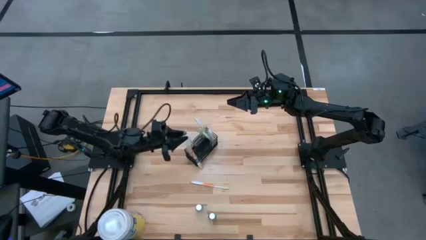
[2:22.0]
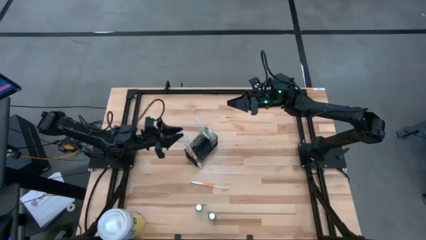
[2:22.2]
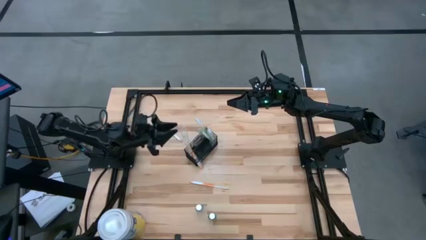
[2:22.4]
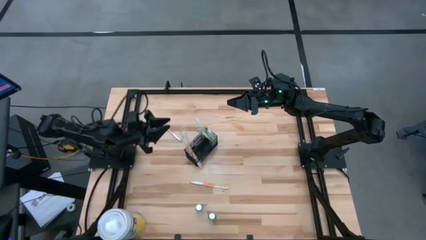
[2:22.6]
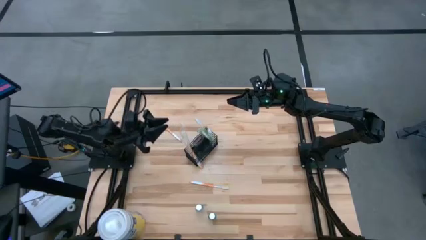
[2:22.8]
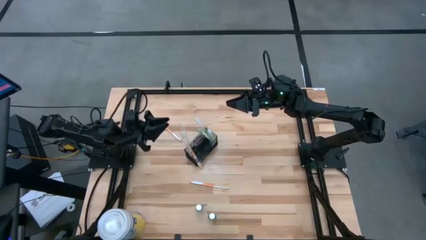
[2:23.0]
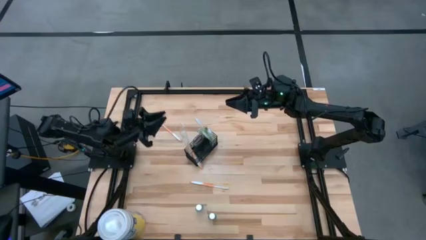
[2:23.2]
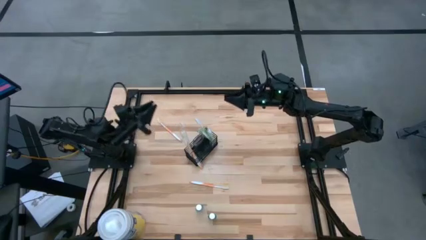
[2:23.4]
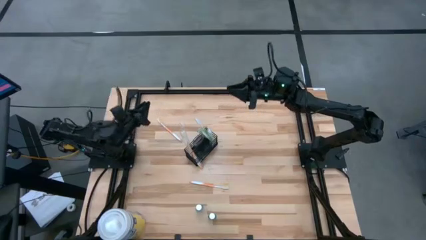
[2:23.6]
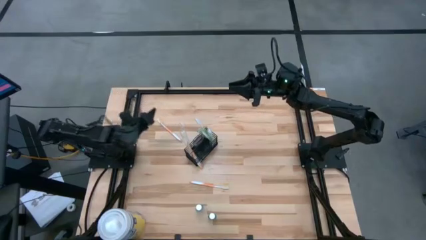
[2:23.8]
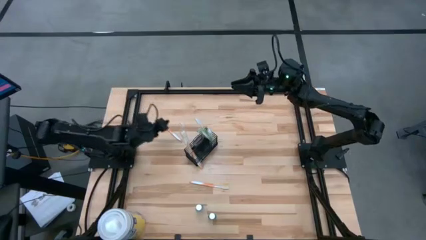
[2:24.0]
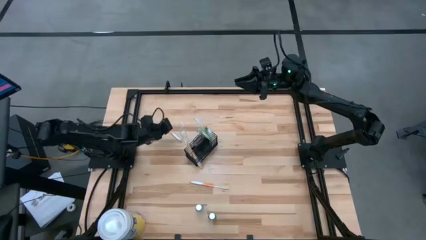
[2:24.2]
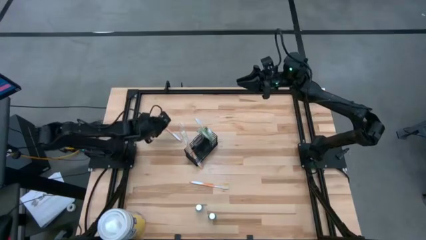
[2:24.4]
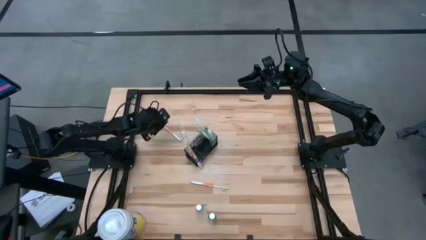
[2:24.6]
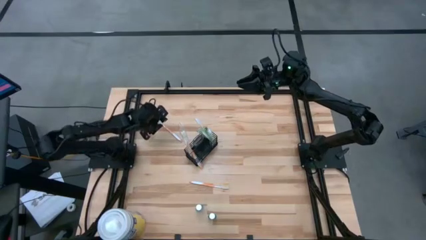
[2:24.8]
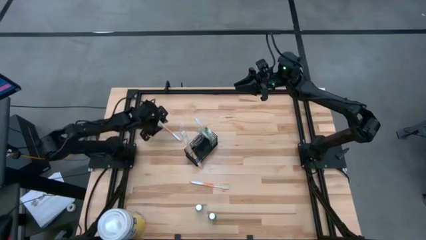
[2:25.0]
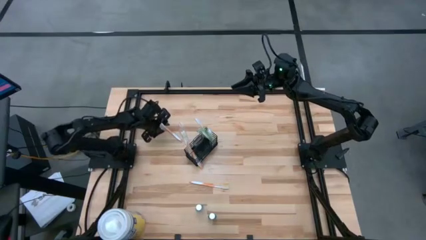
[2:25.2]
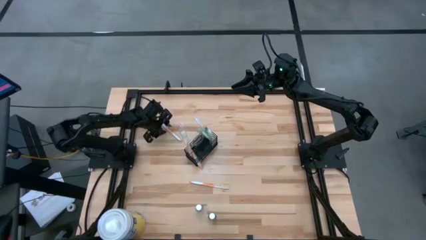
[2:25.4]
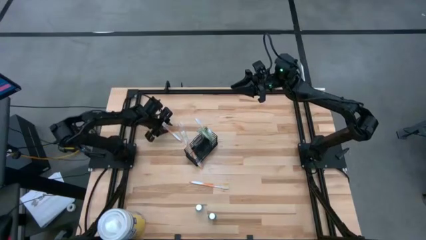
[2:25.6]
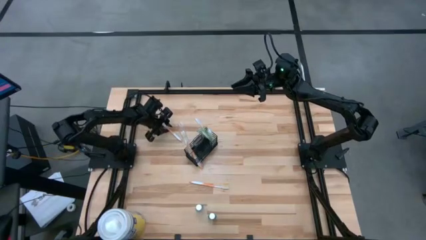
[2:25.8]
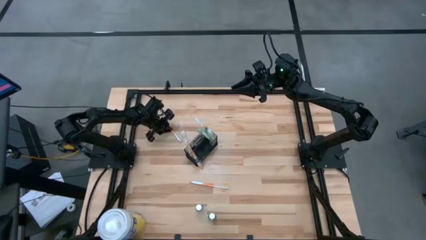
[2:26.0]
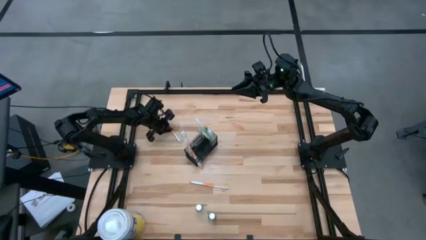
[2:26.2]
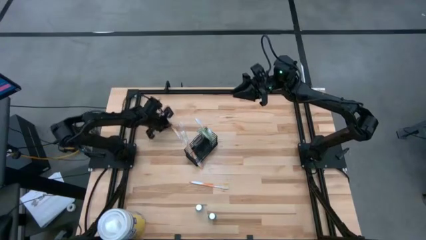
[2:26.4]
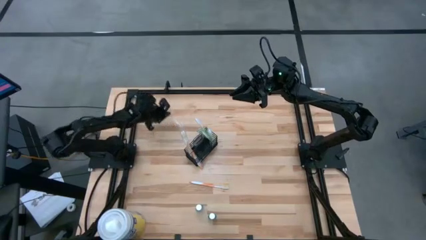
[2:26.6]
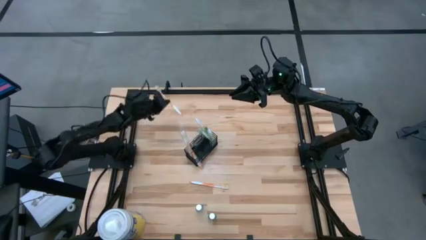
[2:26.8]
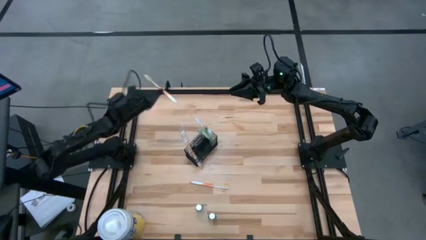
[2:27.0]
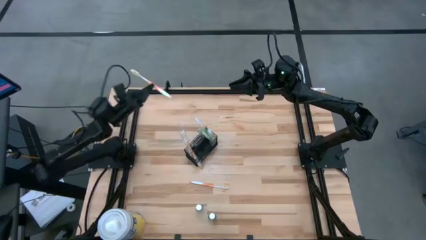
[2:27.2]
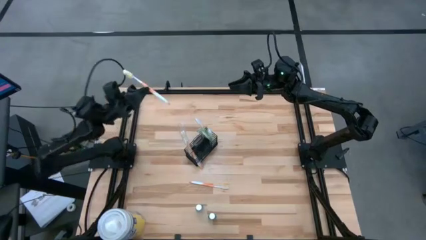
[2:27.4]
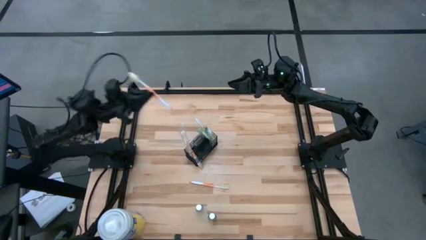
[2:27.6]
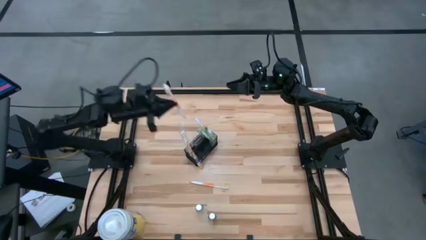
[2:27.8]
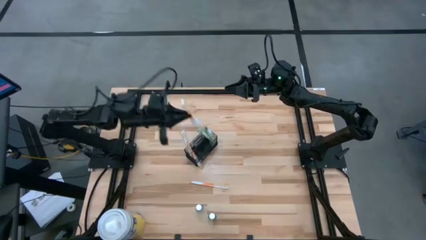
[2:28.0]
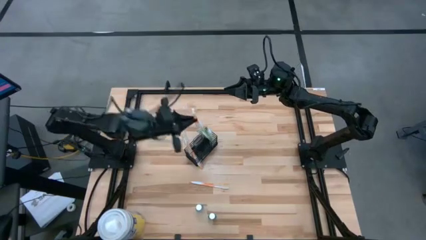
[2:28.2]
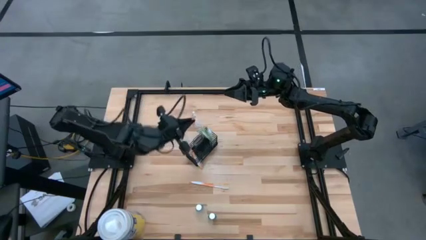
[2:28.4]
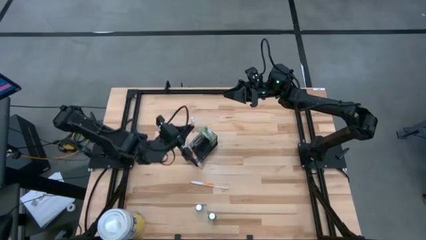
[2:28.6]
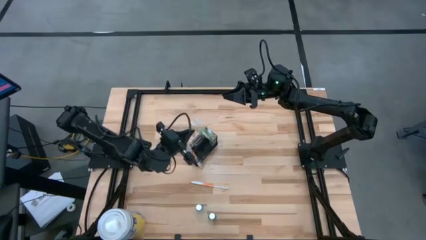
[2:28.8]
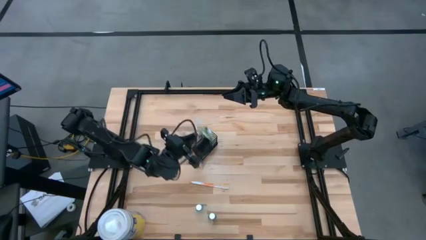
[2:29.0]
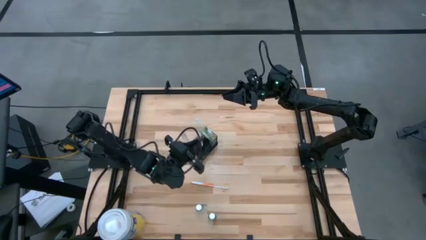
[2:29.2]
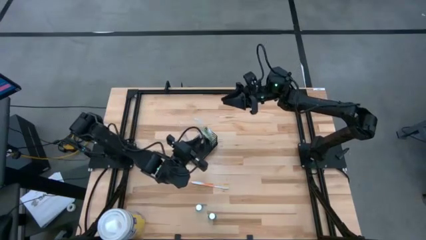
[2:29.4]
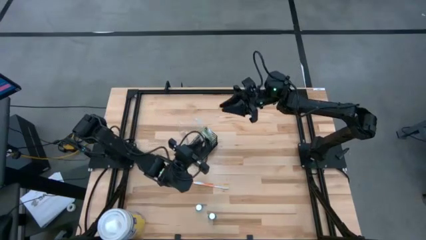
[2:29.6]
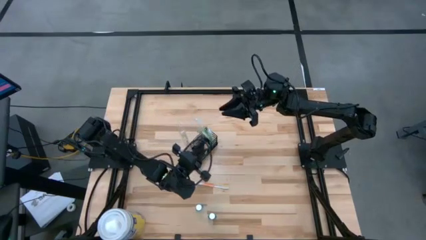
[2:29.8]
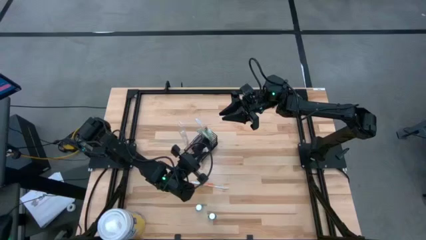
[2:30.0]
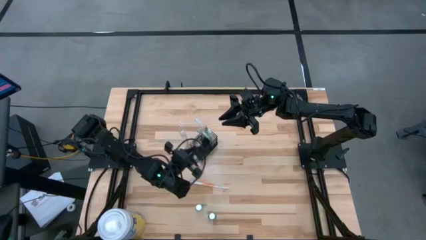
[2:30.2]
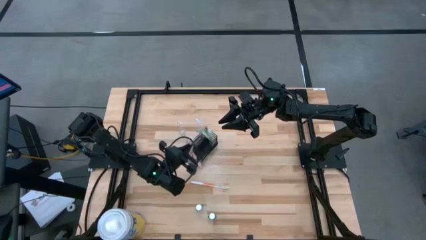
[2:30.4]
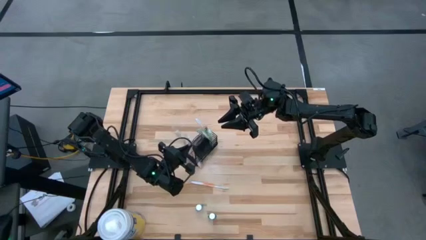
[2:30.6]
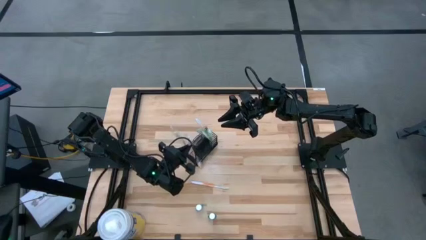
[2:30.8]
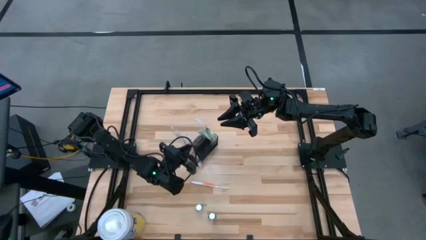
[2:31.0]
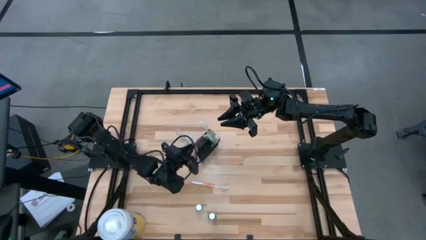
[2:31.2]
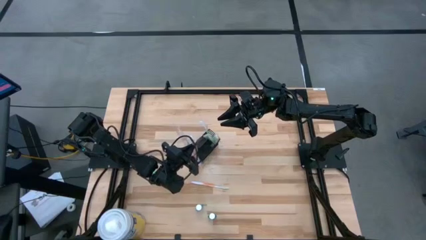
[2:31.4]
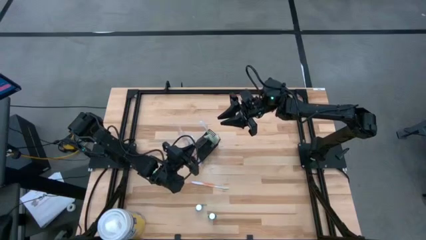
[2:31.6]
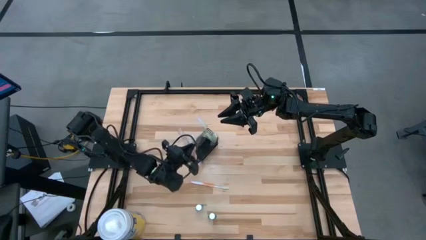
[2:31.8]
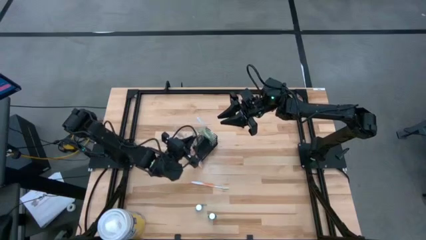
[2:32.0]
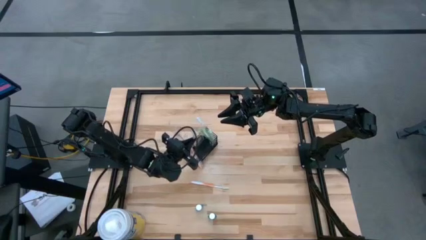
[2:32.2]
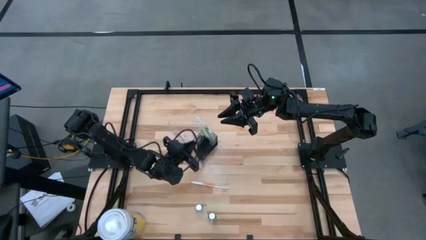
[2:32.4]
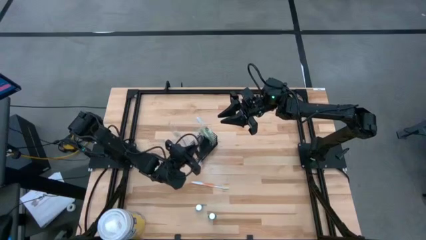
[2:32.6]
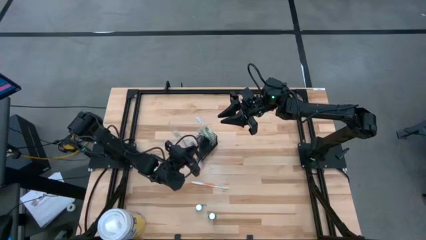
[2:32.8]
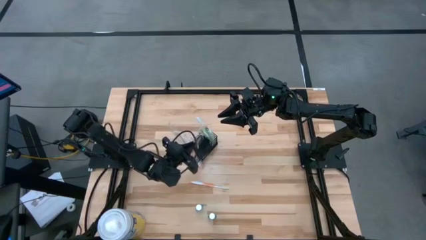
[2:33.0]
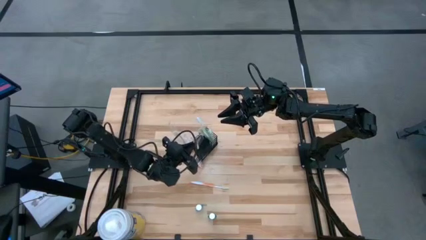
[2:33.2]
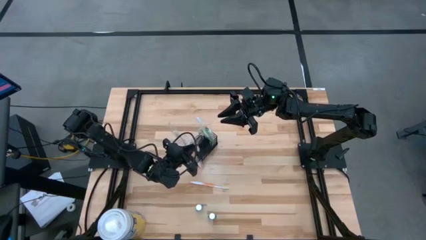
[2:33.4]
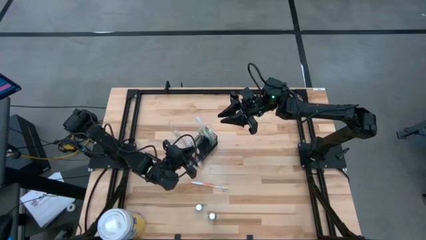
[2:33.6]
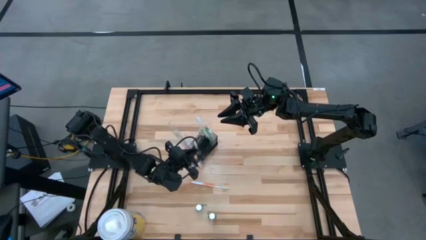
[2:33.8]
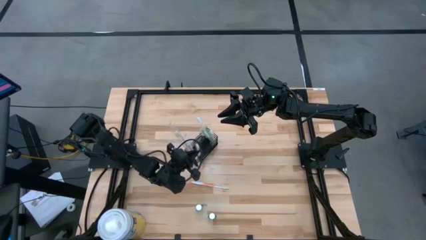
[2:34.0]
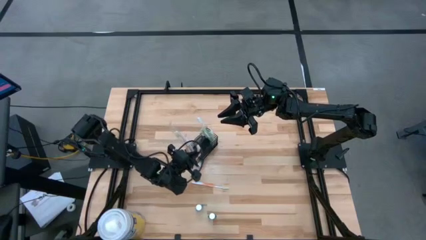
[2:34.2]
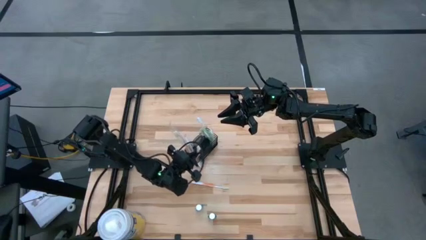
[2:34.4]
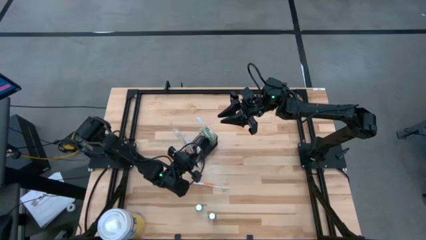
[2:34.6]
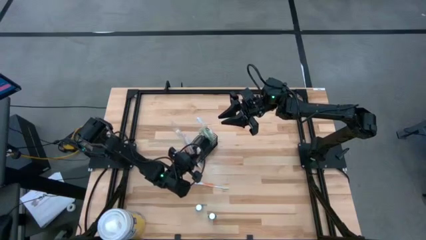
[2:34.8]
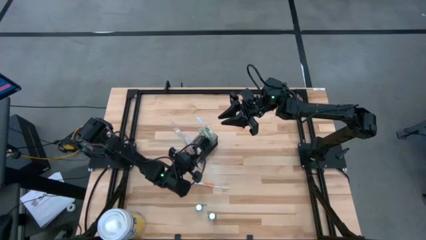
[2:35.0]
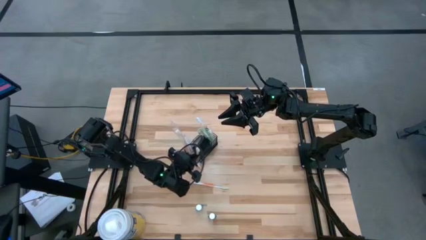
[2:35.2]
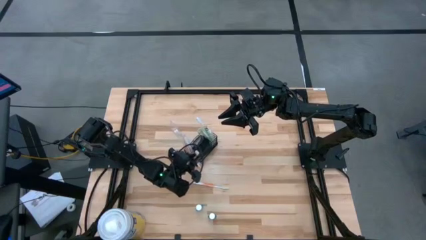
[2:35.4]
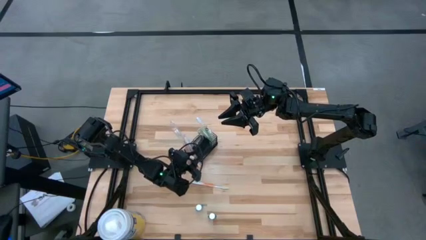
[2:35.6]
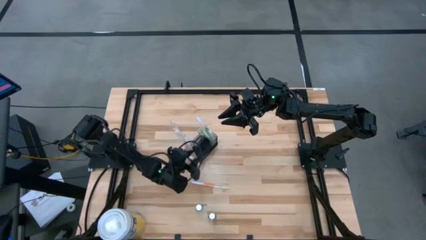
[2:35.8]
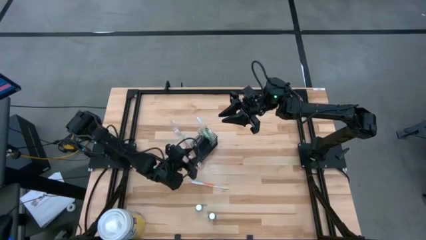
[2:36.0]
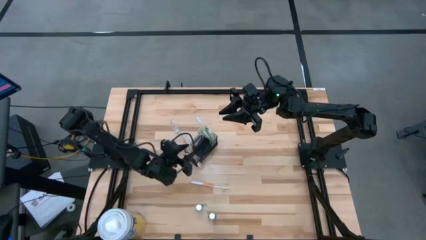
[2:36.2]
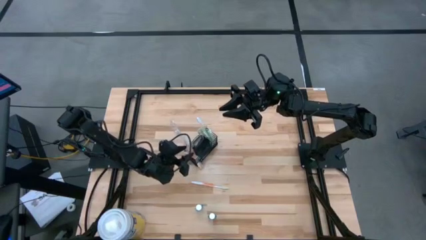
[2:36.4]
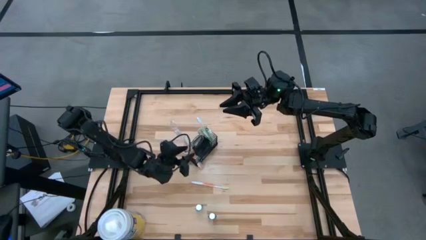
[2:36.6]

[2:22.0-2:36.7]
Task: Pick & Place toothbrushing station
Put the top orange toothbrush into the wire organizer
